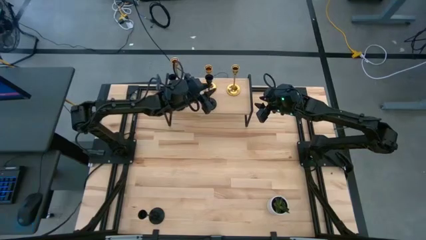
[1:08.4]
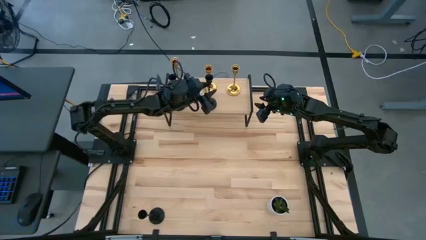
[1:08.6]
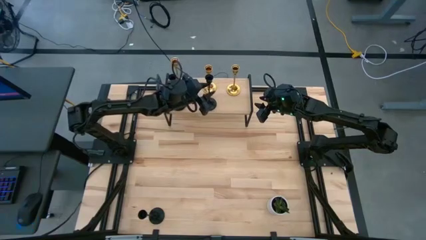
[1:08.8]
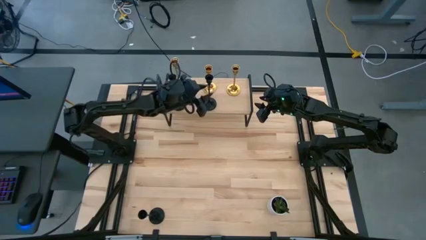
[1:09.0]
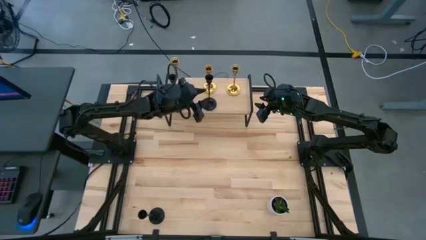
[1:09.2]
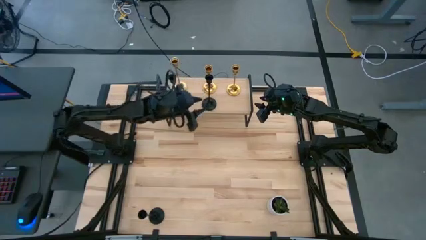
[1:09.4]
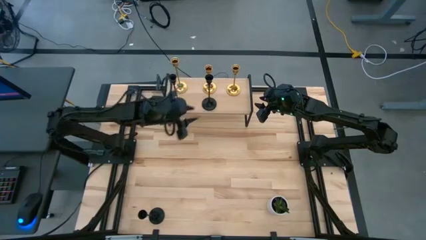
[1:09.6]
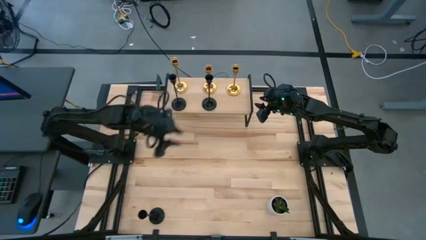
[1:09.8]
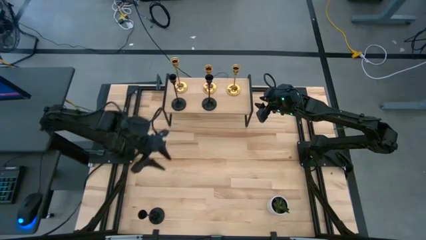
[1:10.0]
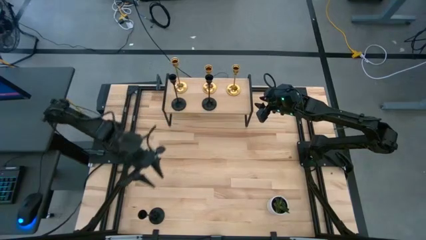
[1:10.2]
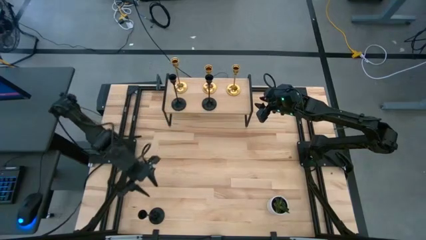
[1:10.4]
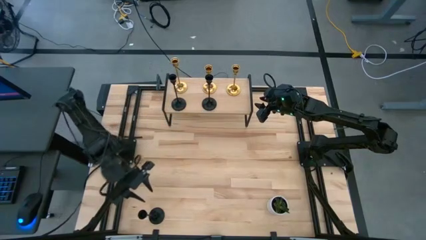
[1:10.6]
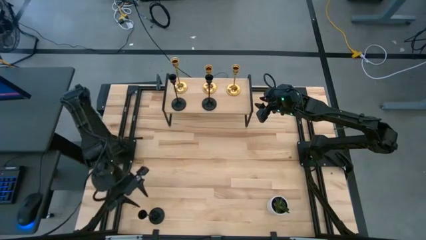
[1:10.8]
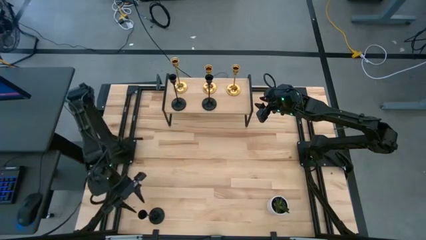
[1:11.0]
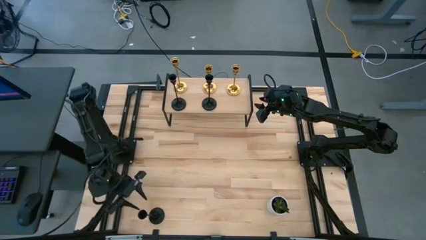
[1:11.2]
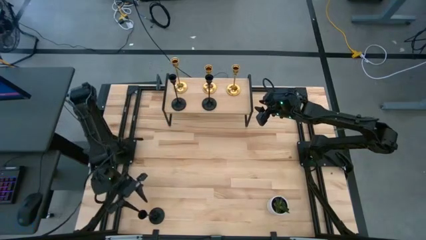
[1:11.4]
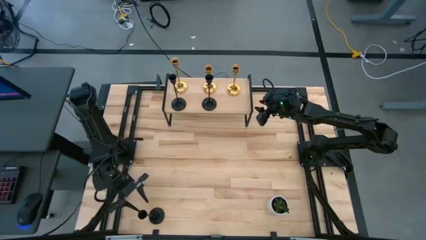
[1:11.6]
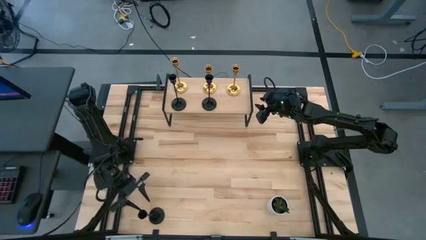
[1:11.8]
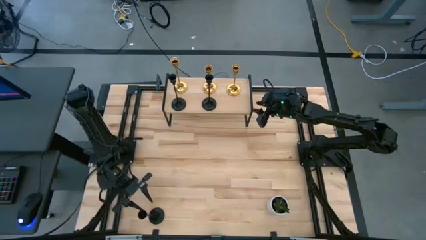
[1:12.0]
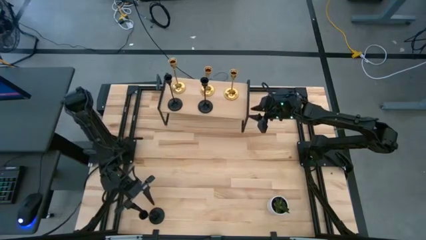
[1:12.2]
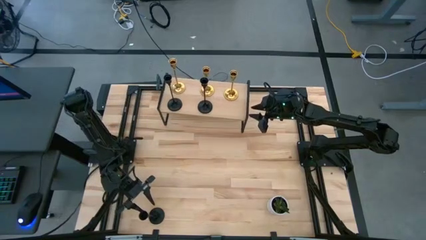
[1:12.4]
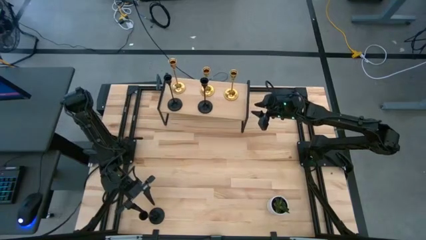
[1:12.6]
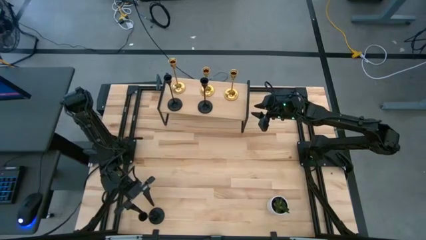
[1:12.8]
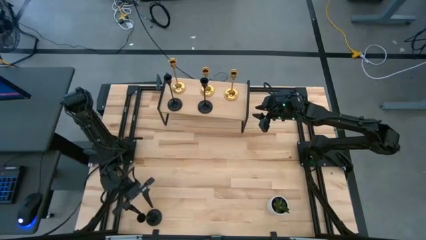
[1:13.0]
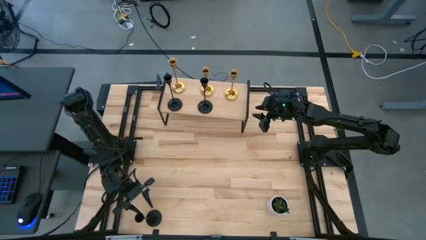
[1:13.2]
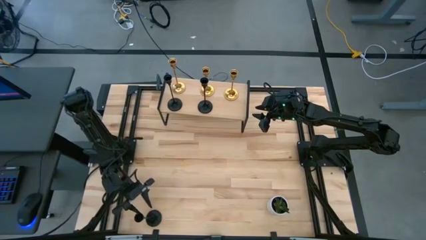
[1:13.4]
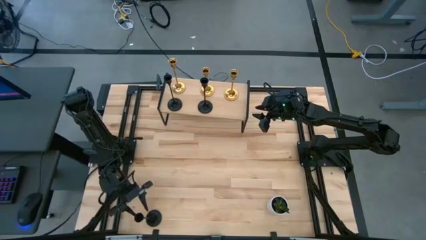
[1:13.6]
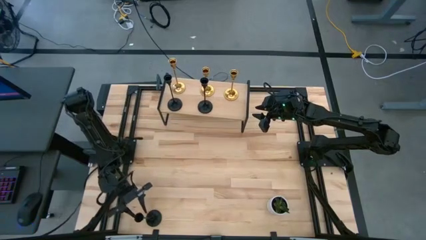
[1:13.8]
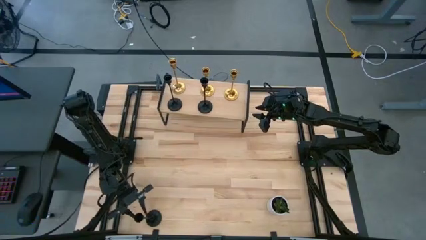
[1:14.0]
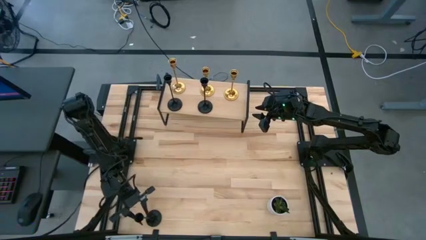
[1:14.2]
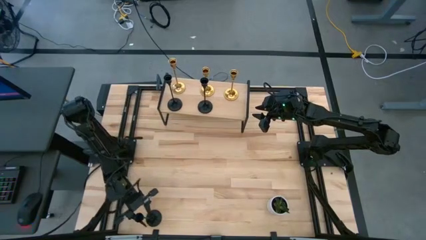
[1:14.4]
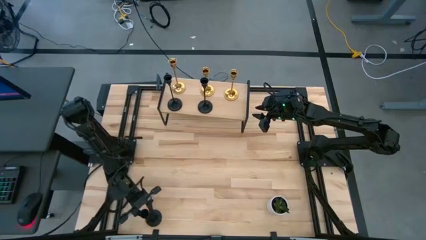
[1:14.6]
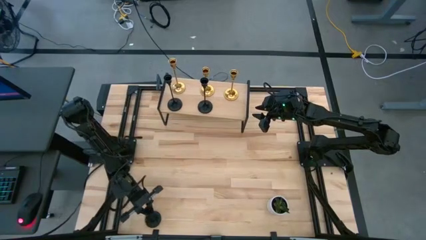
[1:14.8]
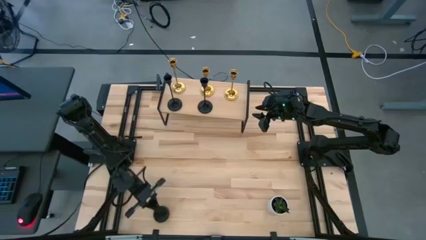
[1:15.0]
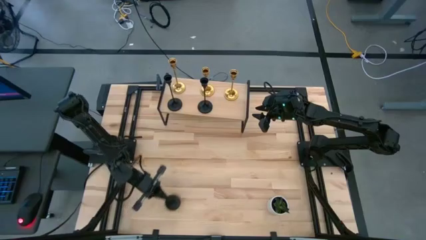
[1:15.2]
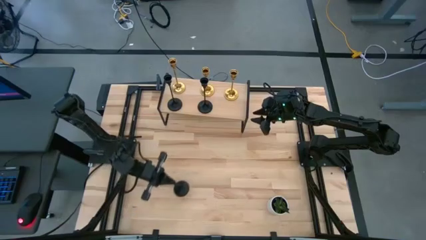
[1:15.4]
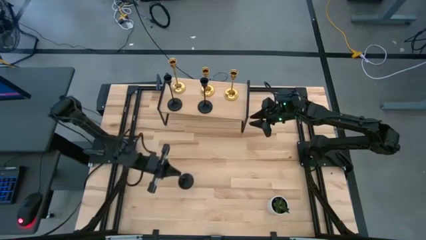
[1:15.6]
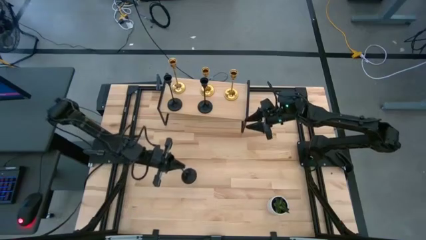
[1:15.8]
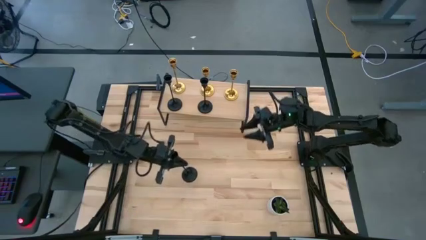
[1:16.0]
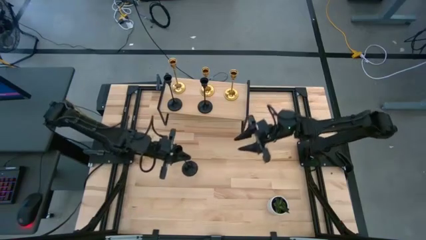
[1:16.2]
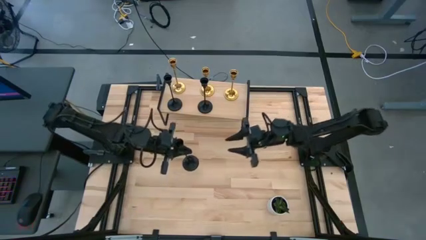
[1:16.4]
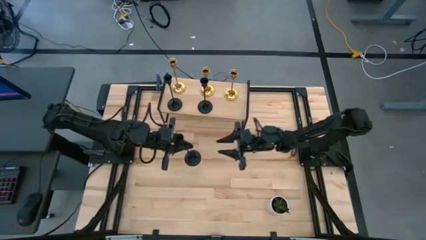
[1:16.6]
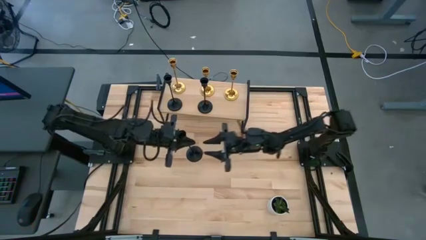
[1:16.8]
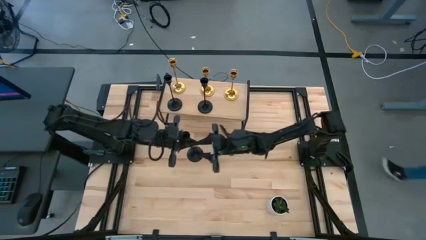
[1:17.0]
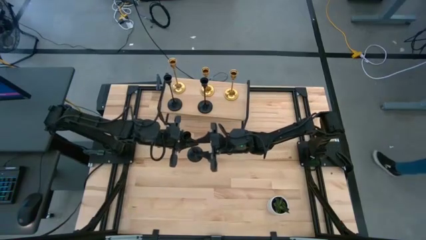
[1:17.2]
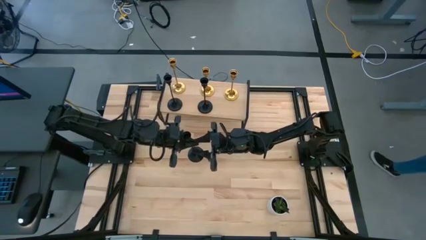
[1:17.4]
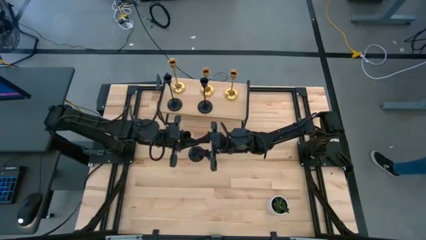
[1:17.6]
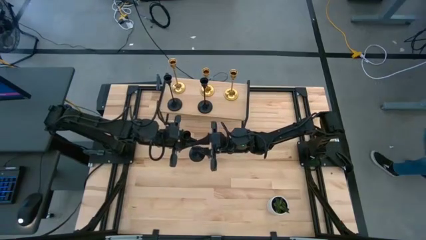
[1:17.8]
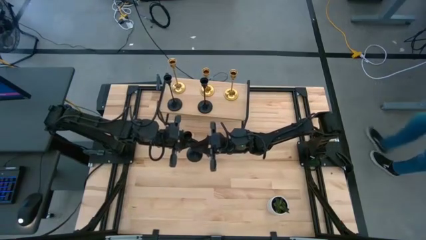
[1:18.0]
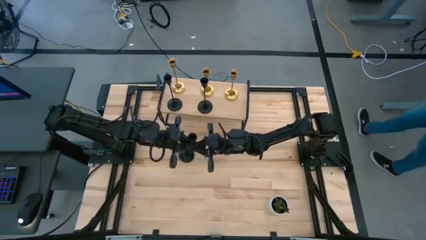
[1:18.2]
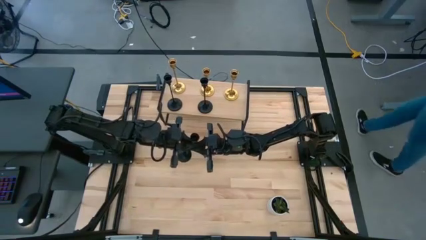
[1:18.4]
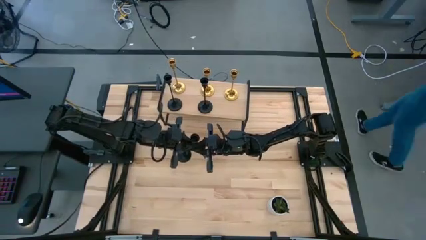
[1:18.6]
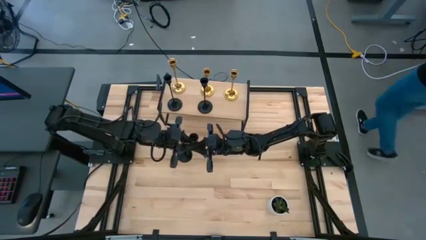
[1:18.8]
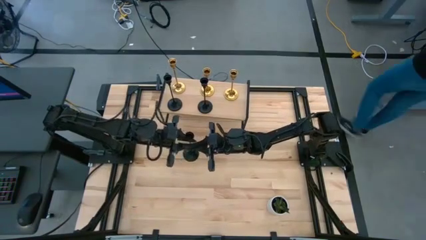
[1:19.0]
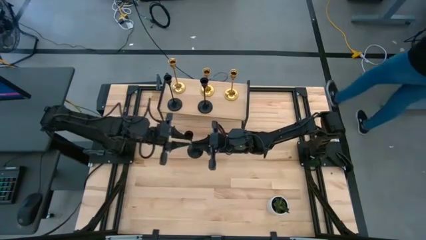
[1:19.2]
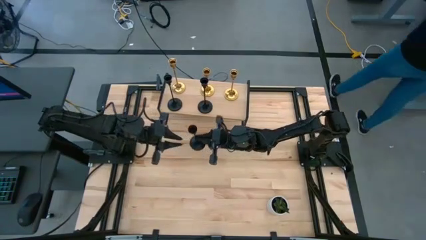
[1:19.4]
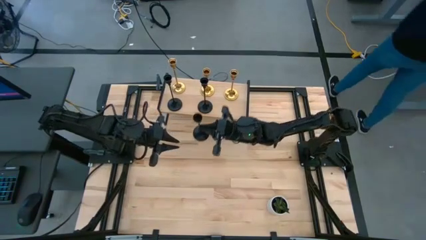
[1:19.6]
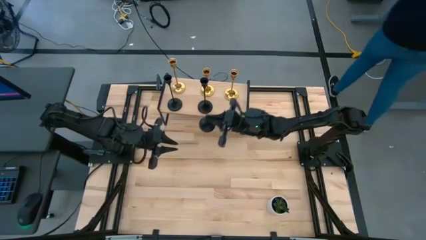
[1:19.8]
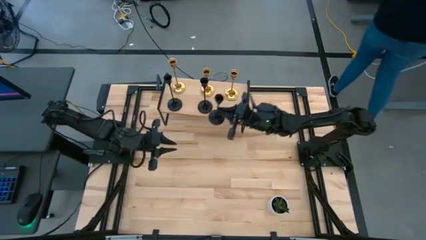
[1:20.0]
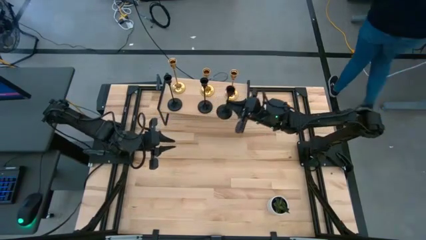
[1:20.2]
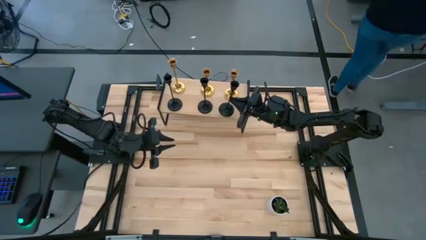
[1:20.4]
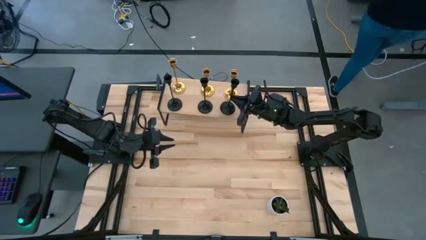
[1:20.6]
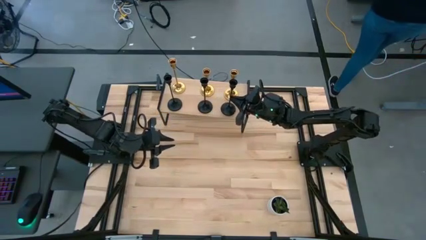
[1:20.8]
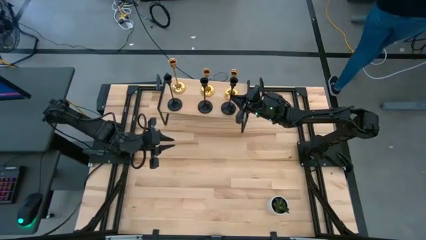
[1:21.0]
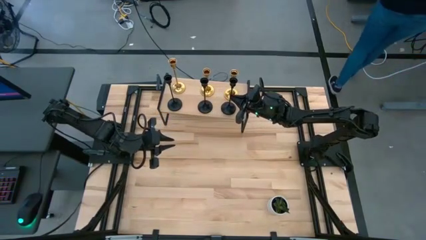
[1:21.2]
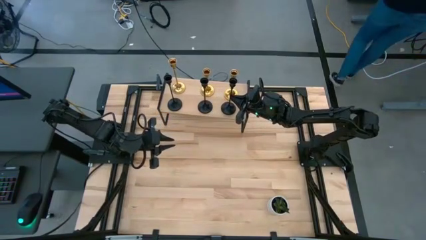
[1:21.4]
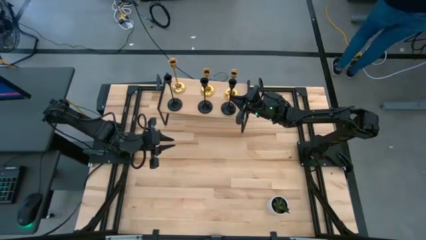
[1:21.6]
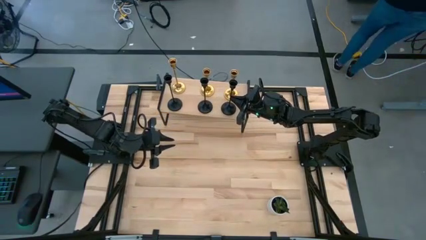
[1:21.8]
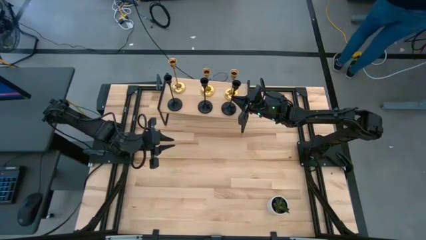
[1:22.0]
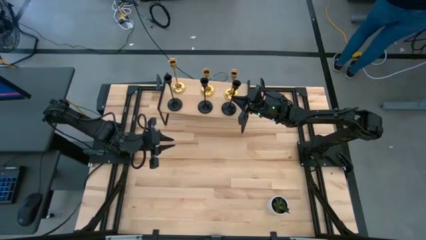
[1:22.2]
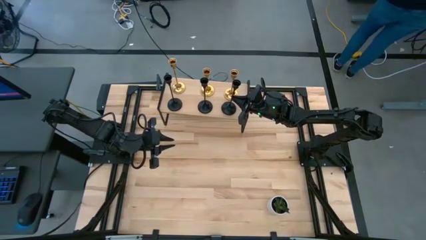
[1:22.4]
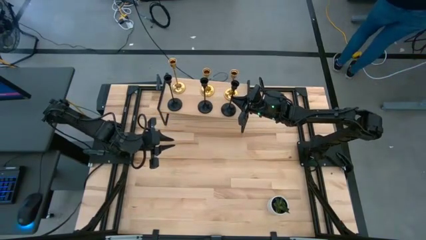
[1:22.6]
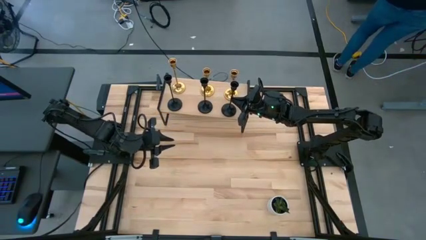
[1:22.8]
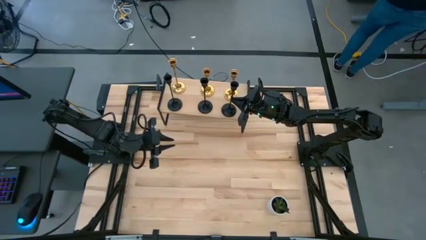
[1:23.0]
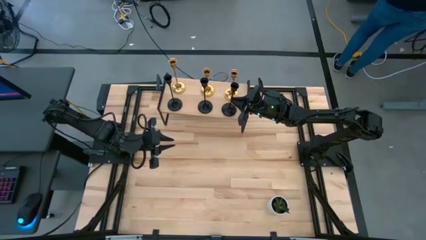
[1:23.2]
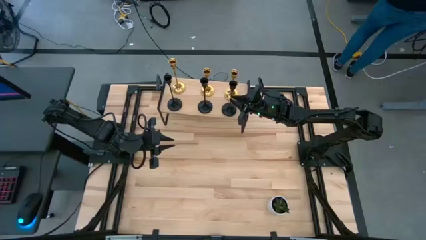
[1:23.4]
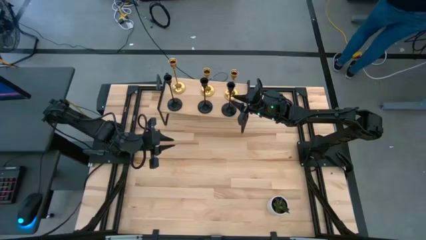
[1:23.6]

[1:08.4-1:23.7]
Task: Pick & Place candle stick holders
Put the black candle holder aligned with the other black candle holders on the shelf
